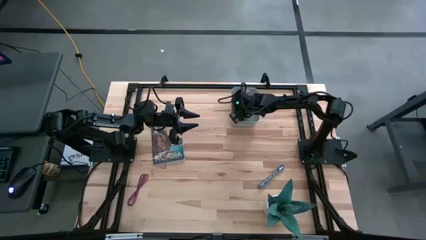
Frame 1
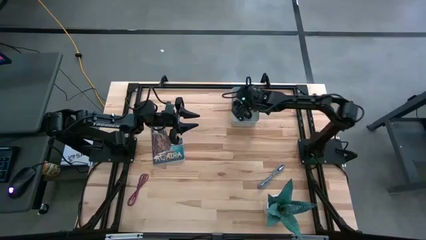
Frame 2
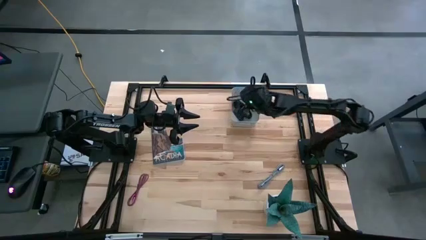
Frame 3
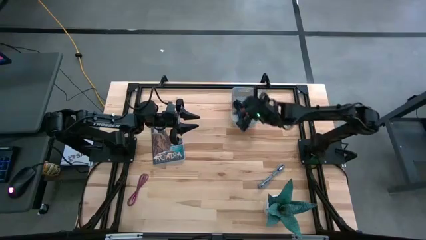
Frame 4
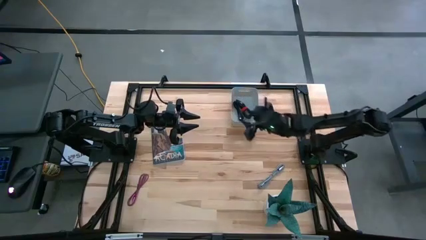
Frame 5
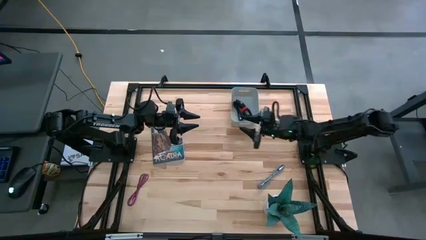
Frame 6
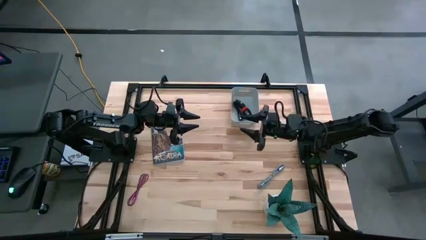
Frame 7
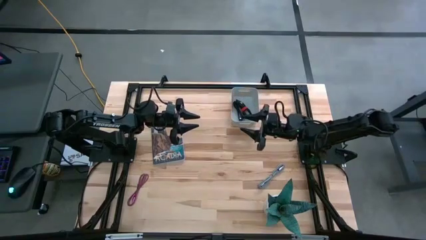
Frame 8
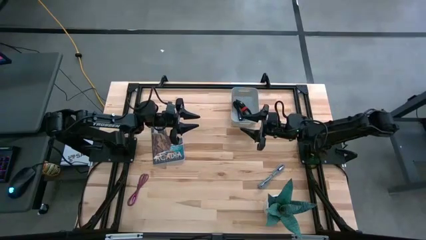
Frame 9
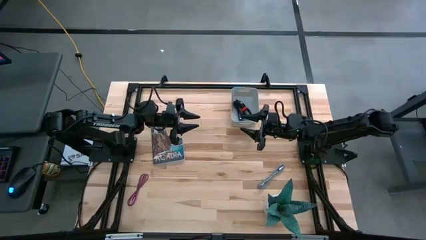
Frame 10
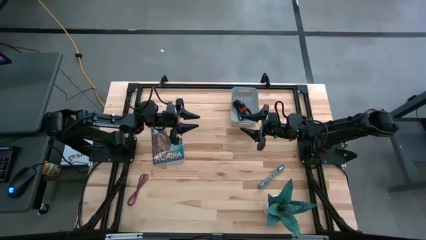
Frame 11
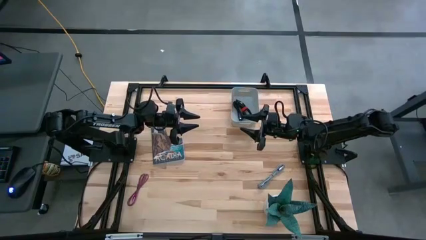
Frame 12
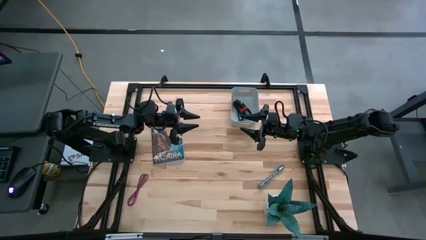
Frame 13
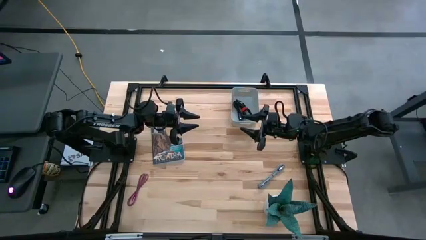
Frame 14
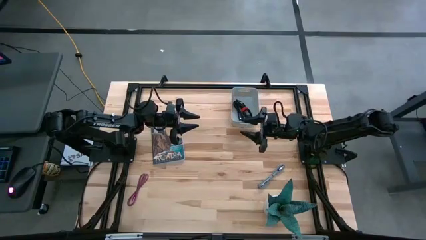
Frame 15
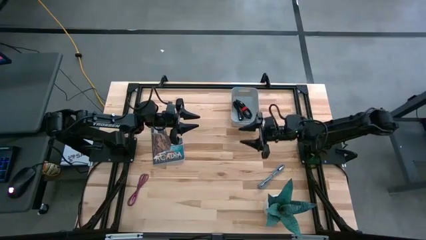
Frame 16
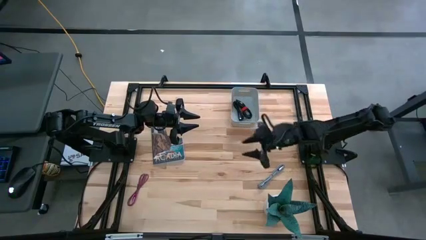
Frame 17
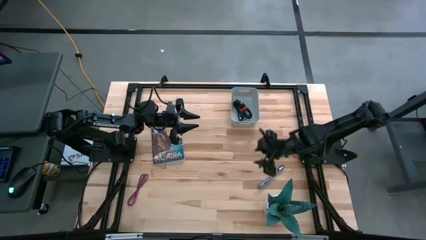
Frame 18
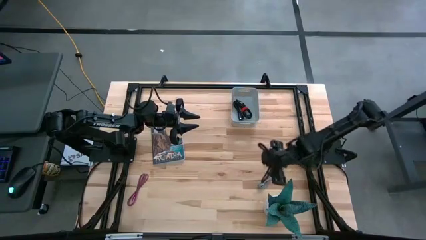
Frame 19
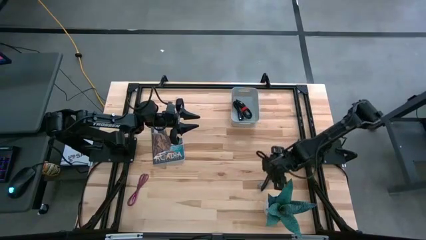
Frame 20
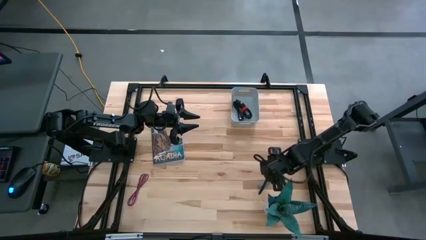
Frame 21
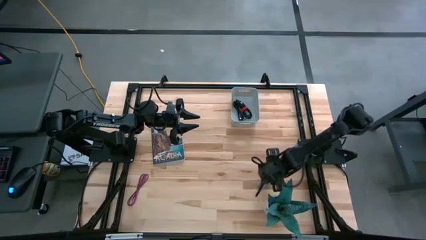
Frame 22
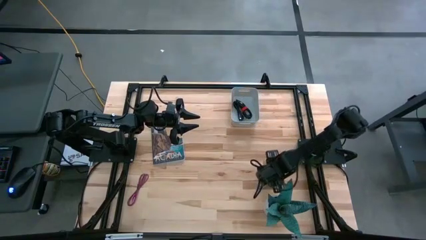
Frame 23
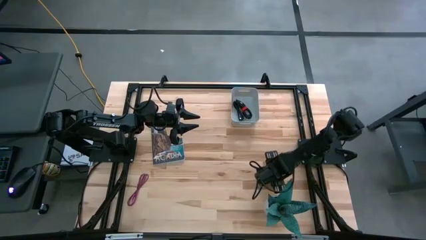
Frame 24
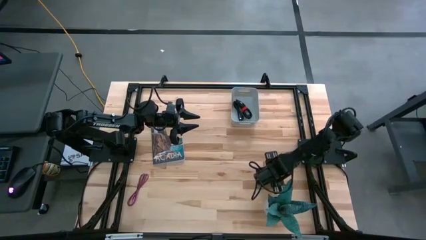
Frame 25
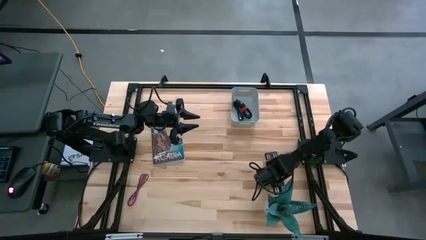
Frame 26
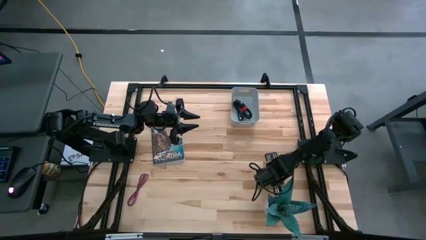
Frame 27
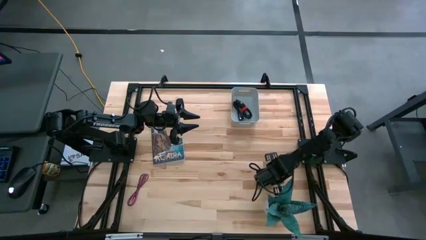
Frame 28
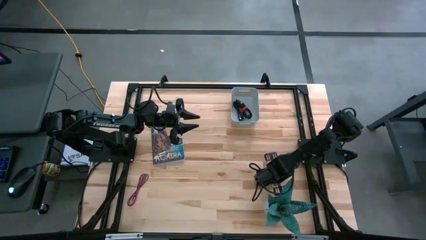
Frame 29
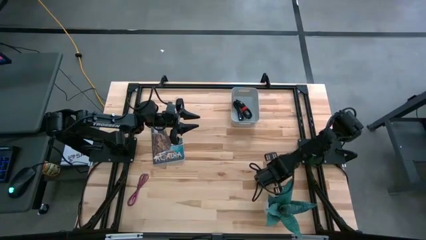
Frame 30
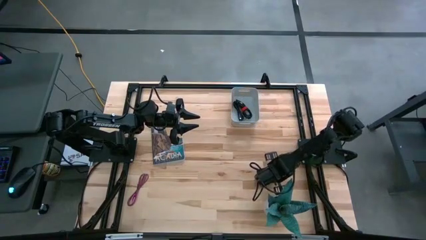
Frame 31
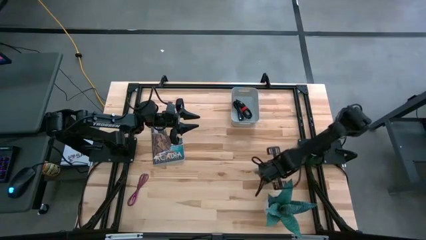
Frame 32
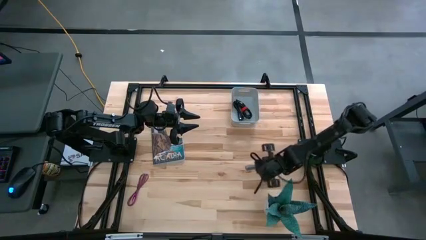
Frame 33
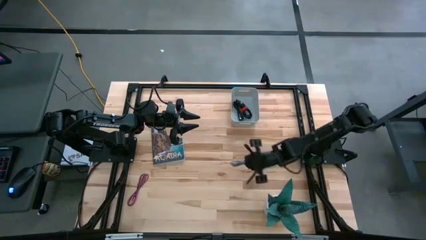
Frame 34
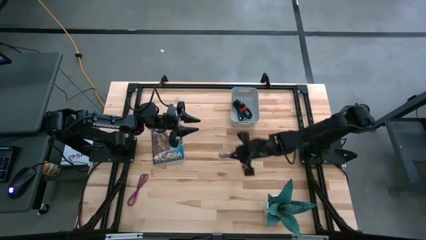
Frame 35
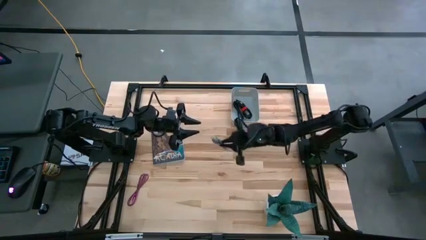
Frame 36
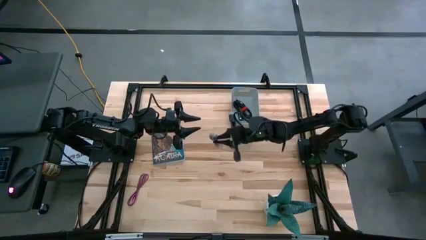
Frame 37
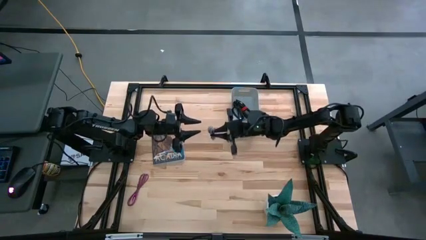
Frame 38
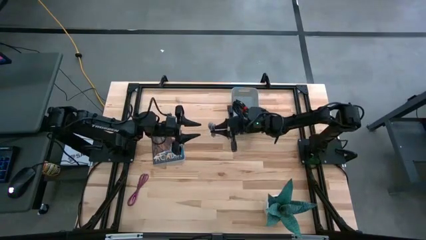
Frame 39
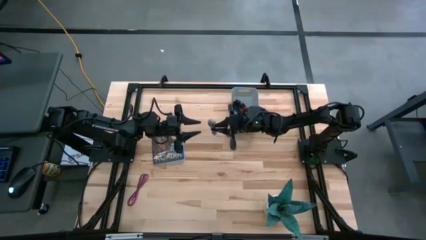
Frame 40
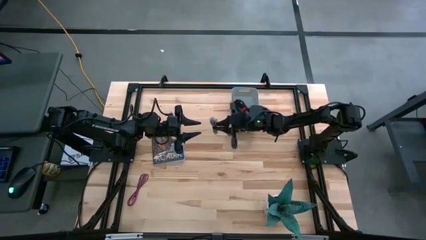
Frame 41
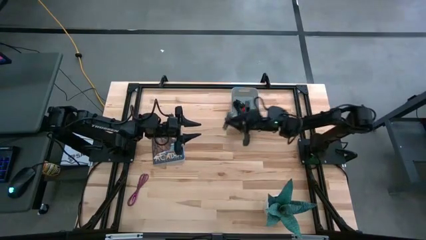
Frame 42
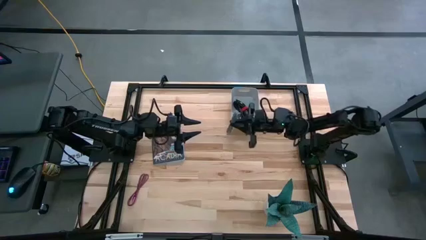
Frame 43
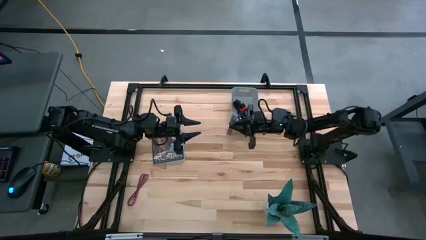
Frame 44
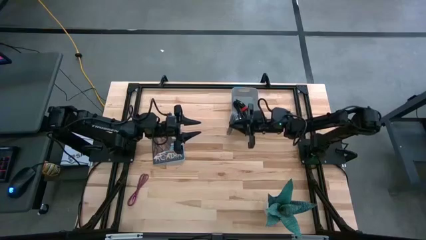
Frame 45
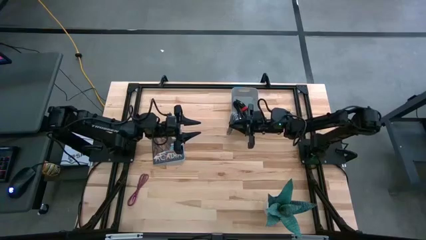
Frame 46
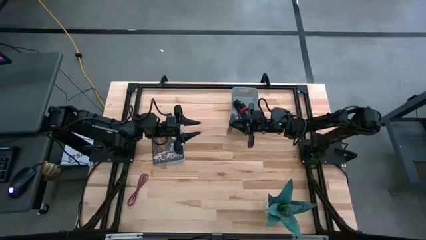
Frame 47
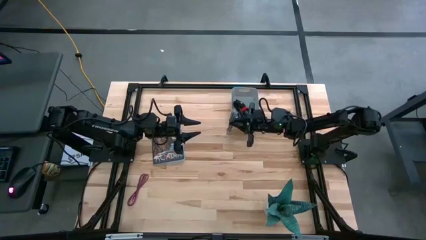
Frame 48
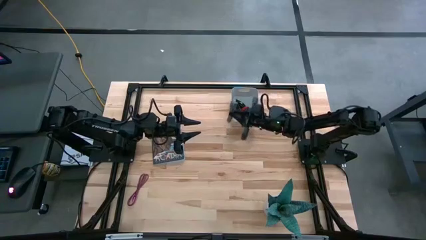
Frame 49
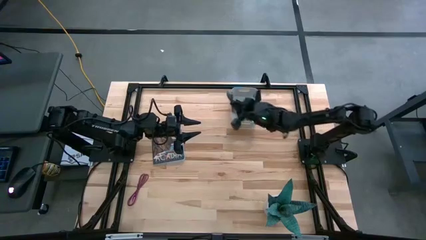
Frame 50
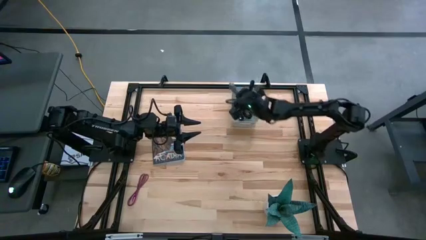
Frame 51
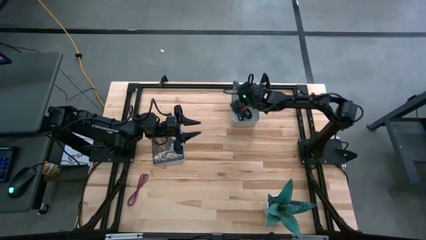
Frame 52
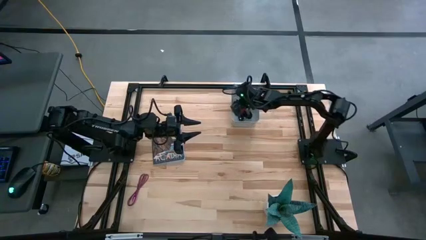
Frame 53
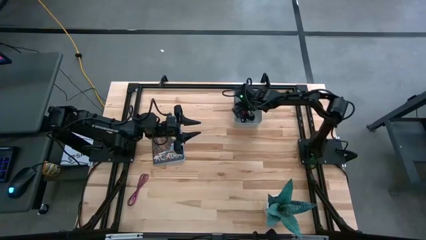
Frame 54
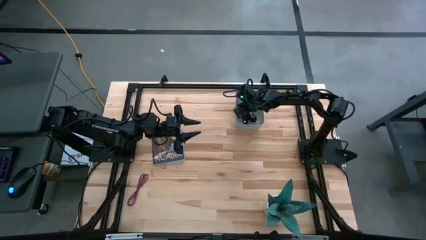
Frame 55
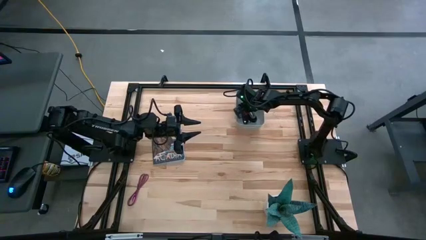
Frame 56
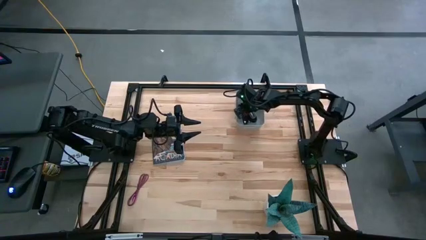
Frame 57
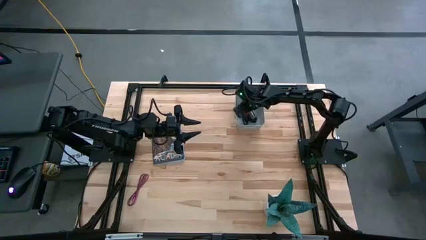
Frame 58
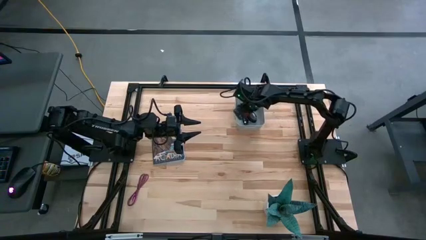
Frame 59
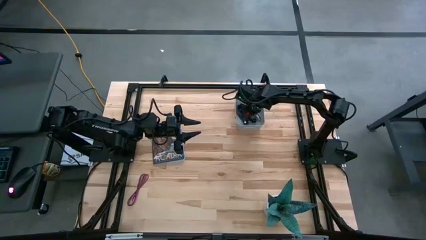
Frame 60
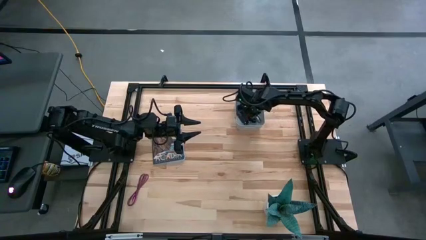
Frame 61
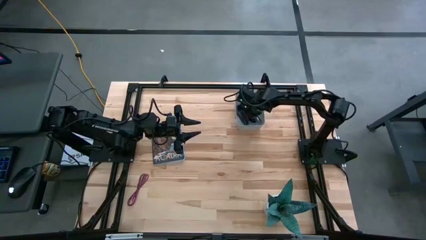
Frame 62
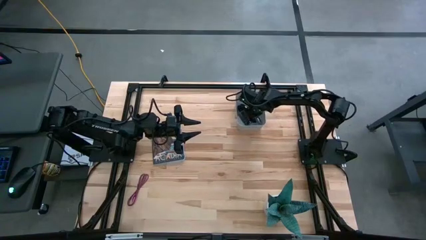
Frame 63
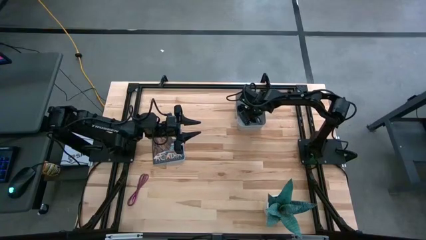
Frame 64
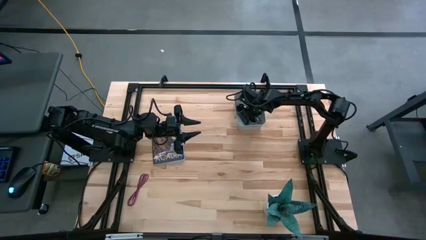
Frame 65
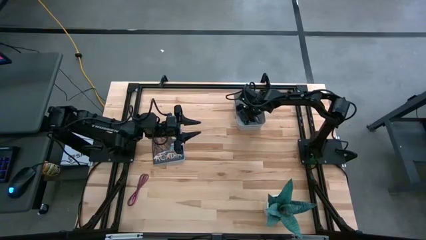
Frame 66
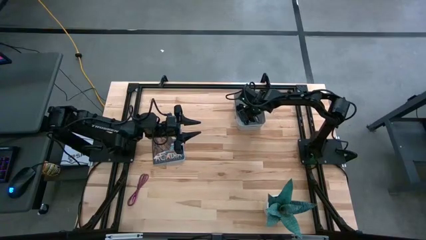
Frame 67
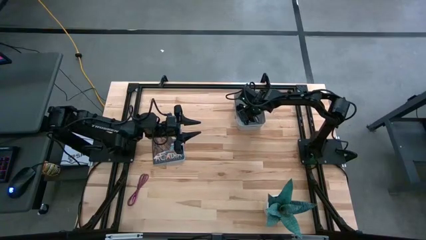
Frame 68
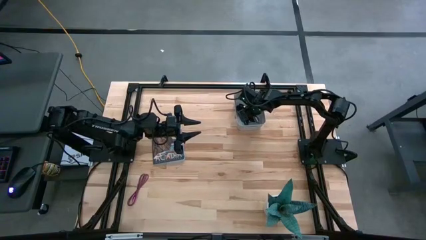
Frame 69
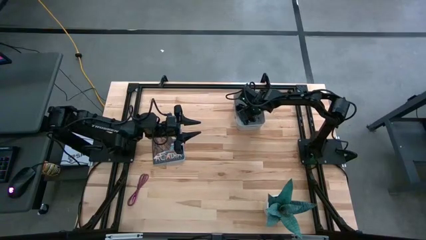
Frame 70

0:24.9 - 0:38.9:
Task: Pick and place USB-C Cables
Put the white usb cable into the white bin

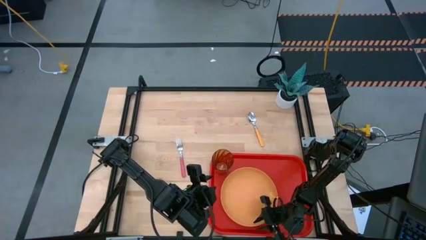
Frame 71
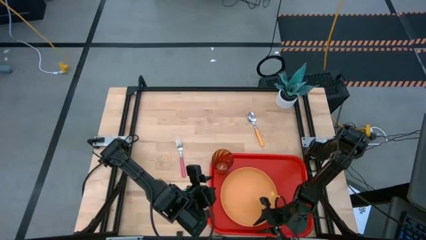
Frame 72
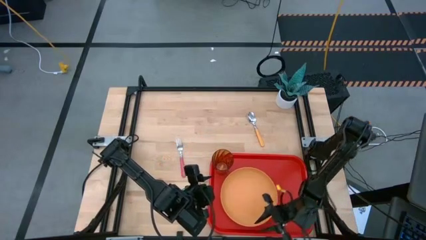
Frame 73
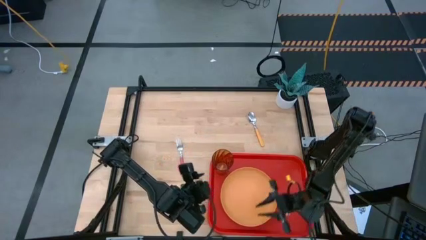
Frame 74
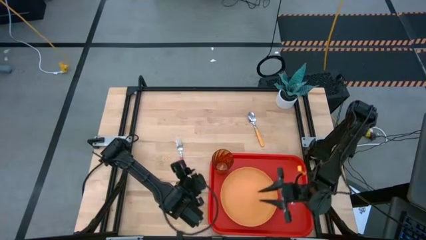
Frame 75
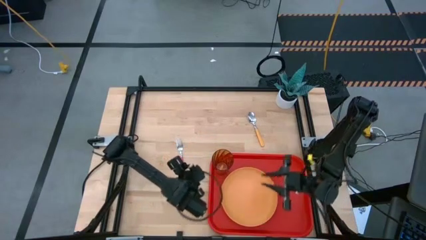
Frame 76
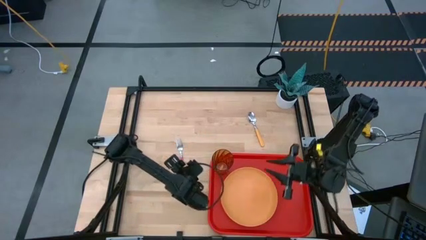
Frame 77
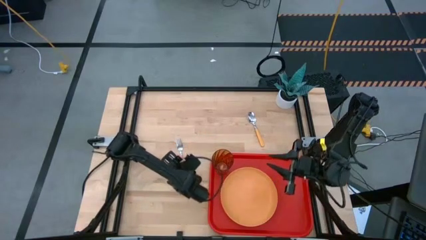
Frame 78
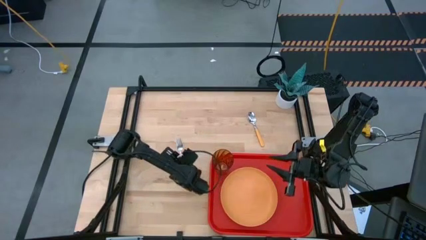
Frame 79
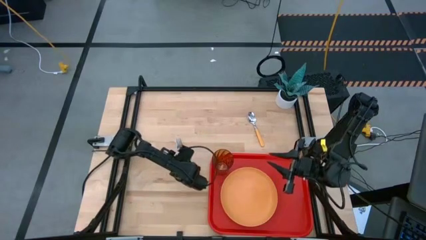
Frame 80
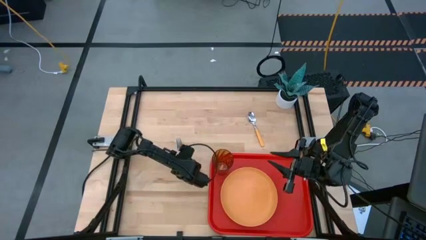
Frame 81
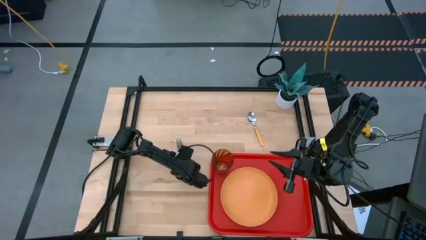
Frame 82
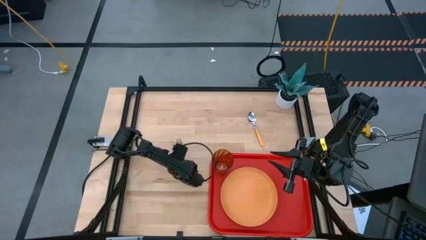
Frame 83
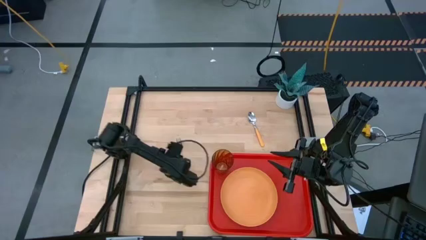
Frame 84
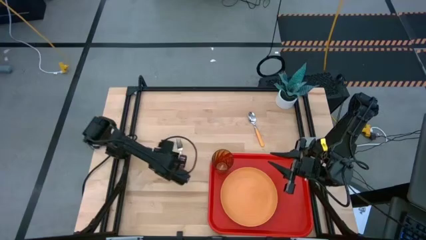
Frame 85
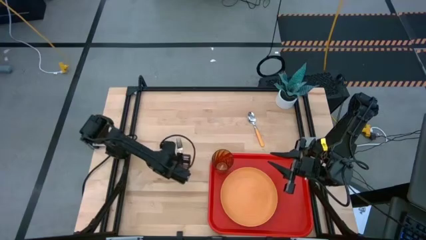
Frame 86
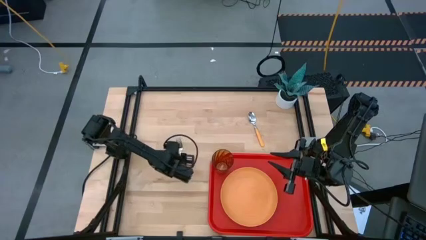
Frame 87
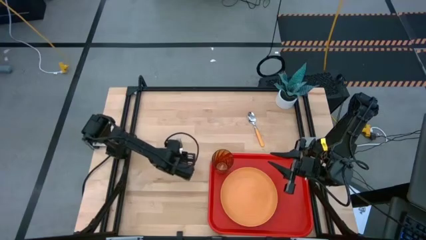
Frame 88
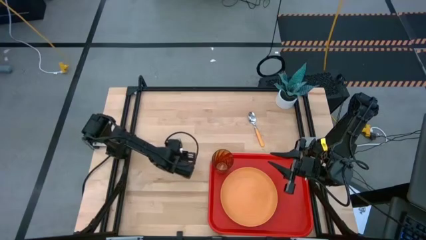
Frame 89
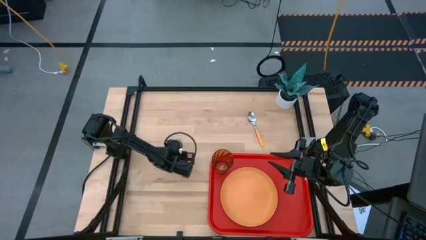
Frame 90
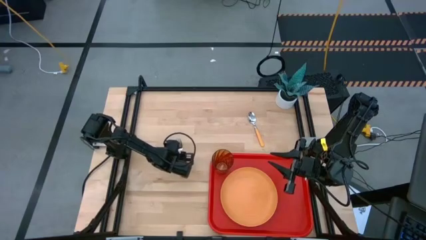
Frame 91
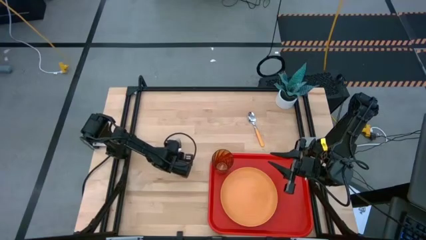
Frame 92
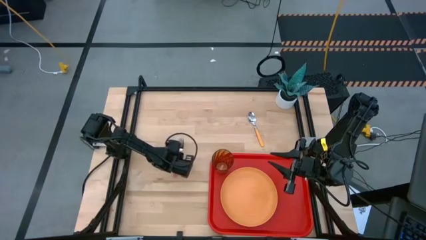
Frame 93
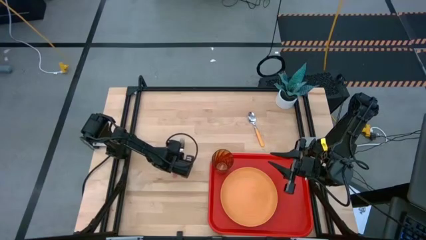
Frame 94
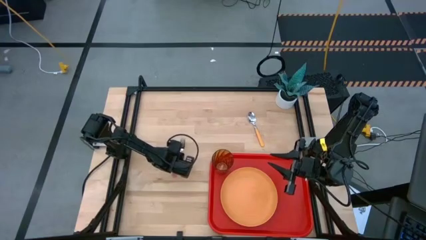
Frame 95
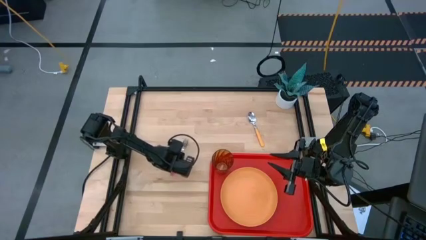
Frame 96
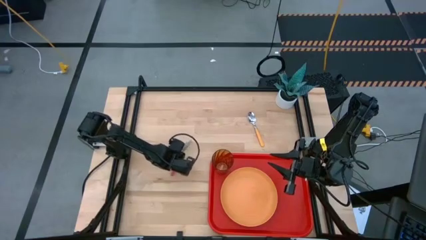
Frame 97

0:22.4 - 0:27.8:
Task: Pick and place plate/cup/fork/spoon on tray
Put the pink fork to the right of the orange plate on the red tray
